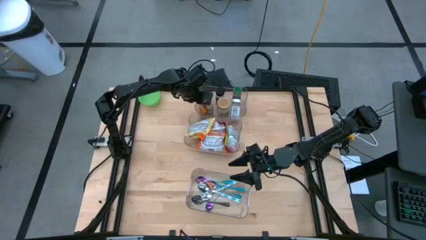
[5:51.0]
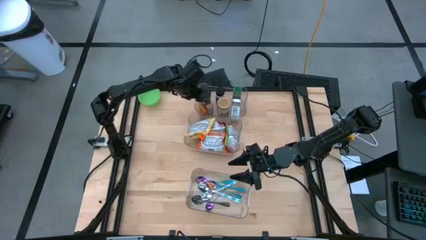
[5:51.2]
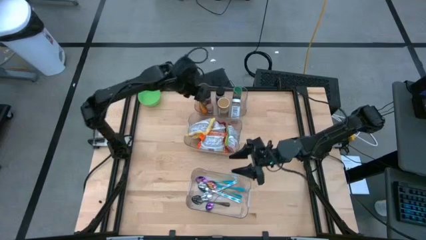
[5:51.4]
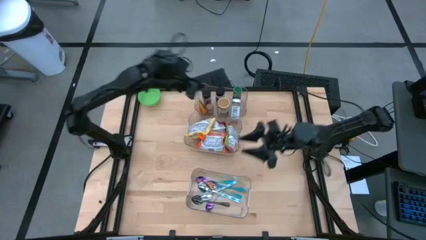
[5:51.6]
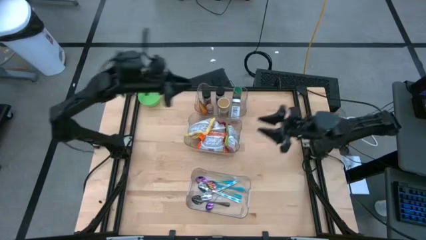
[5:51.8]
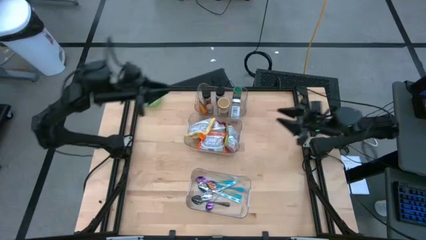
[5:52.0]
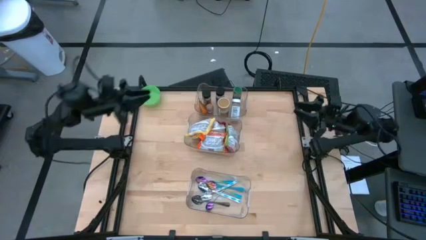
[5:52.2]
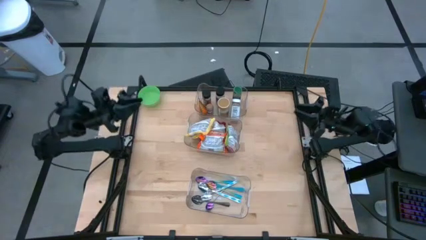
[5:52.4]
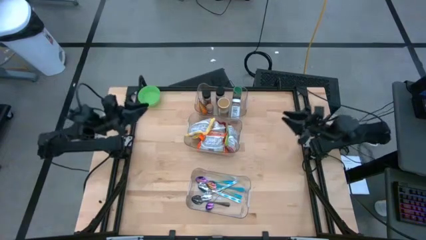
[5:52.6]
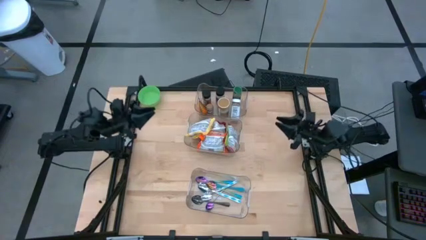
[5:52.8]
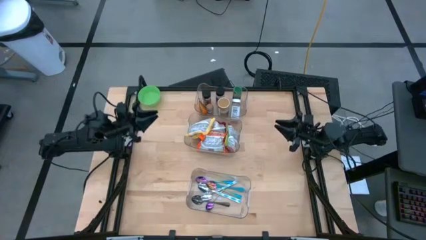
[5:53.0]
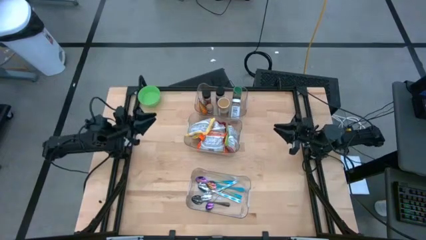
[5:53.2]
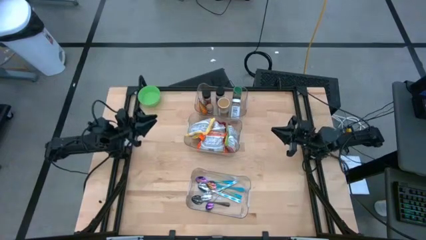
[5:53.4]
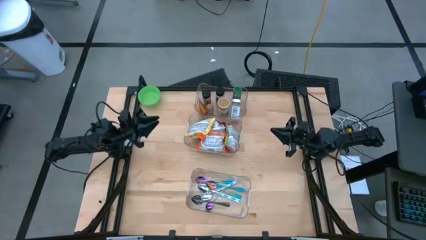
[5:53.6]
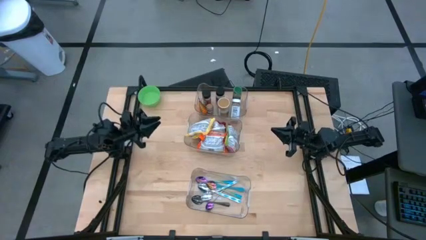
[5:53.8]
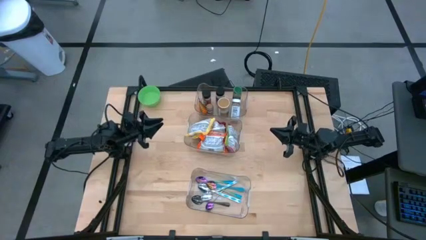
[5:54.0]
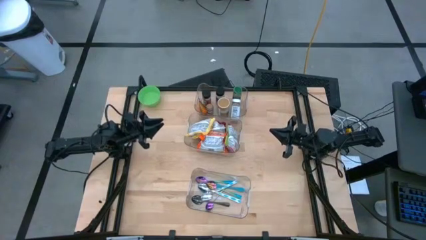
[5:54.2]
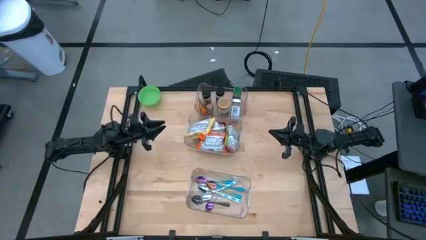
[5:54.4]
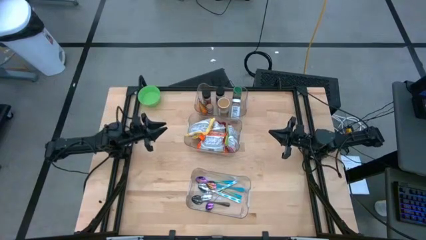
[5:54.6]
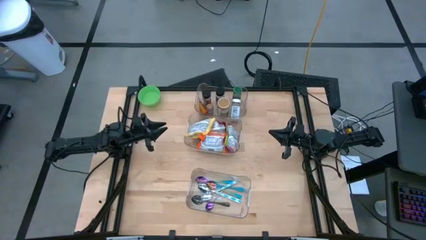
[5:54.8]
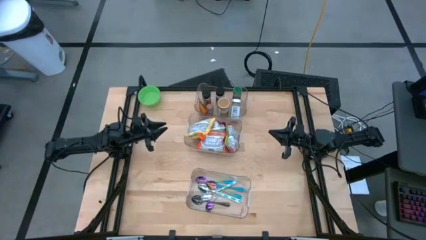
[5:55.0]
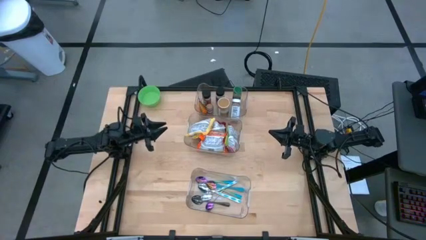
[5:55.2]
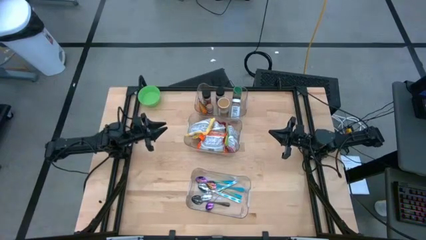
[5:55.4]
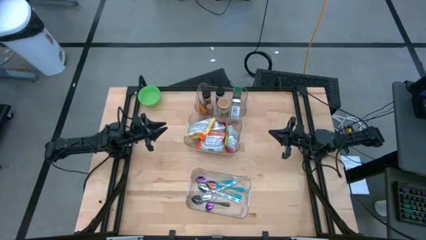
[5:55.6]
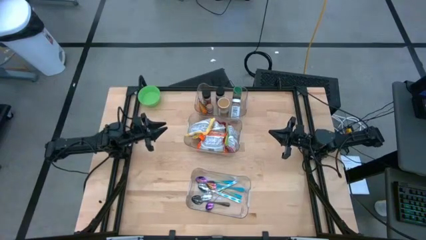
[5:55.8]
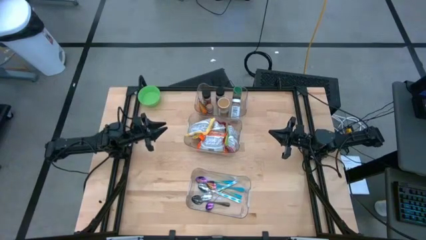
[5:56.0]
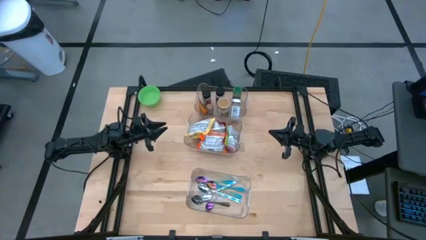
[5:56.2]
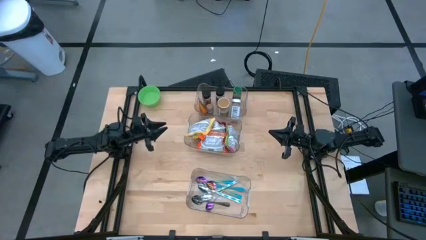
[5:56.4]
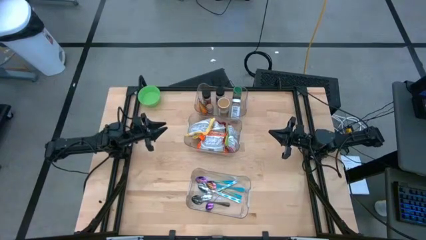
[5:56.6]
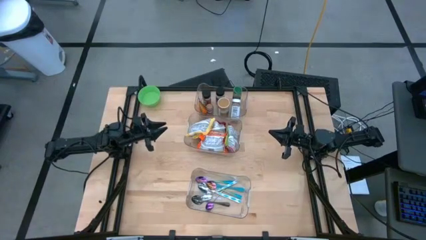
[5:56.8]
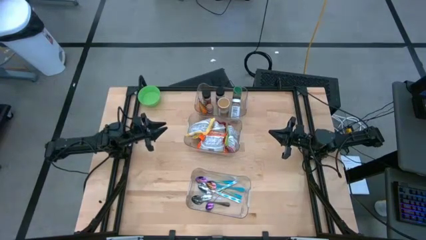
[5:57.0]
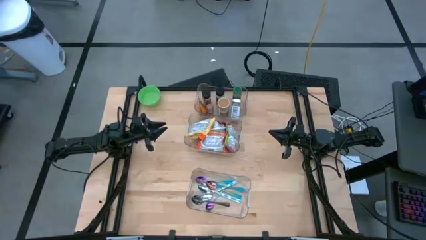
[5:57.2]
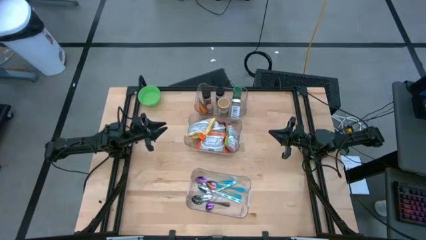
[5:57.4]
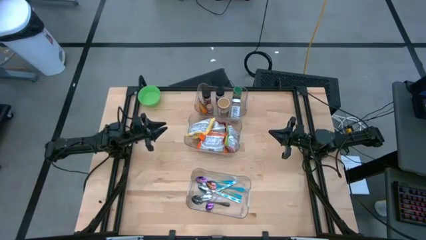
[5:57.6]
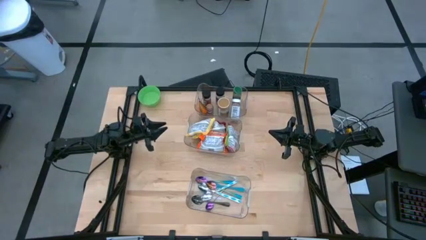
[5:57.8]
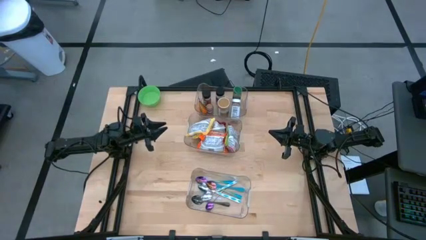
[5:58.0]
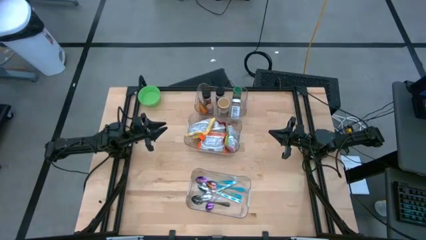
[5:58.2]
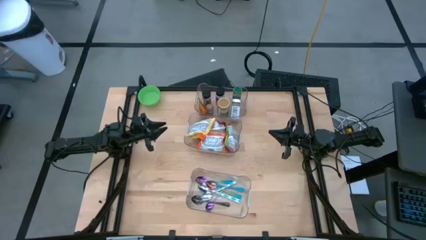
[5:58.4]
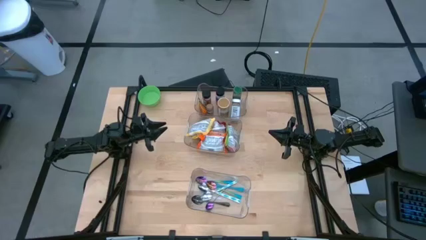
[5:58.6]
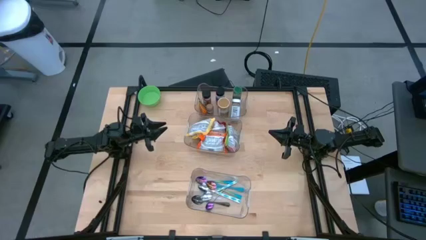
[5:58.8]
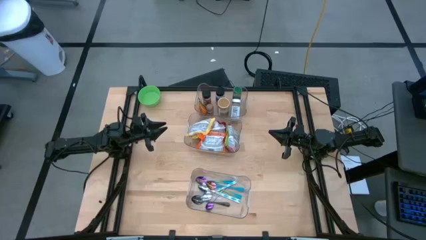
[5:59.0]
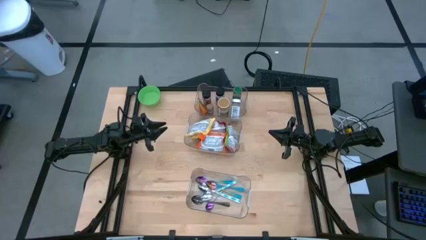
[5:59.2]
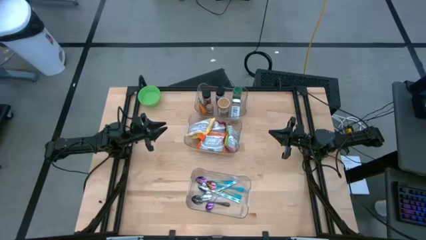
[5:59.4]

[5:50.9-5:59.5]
Task: Pick & Place Food Item
Return to Home Position

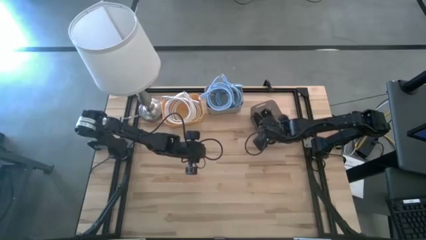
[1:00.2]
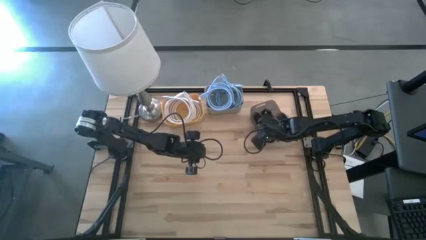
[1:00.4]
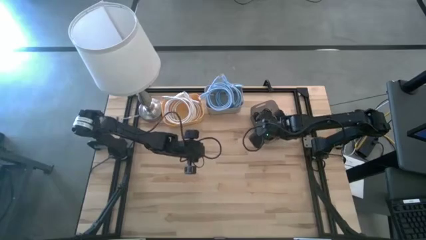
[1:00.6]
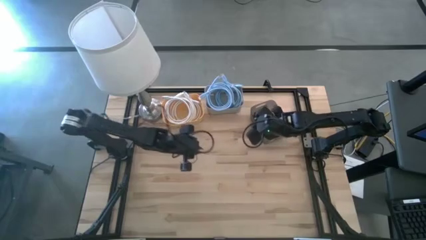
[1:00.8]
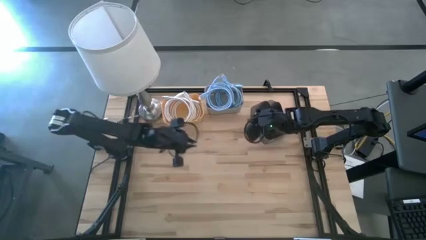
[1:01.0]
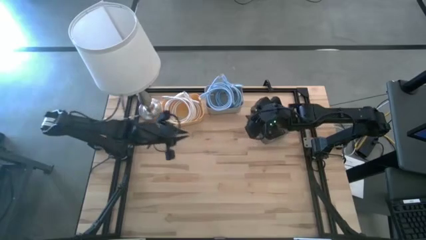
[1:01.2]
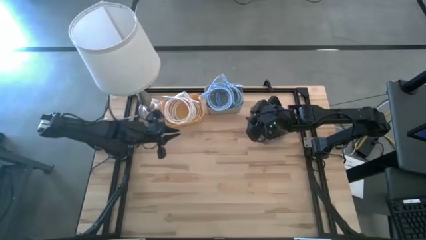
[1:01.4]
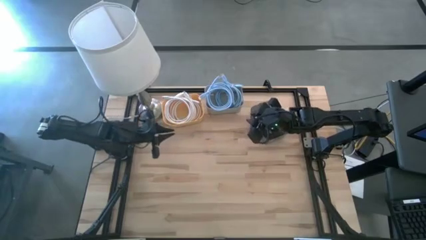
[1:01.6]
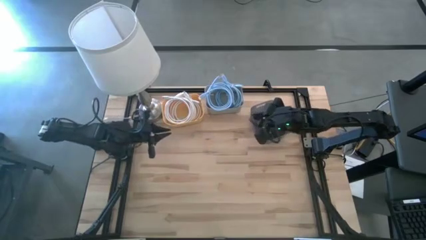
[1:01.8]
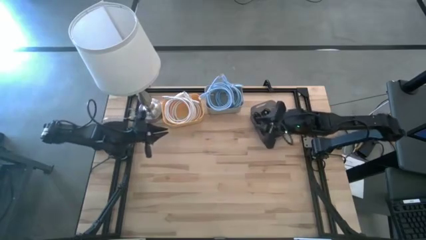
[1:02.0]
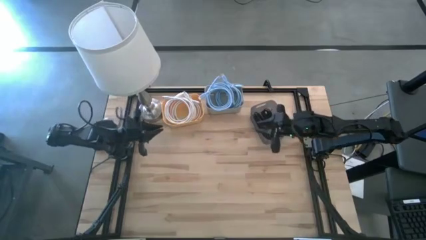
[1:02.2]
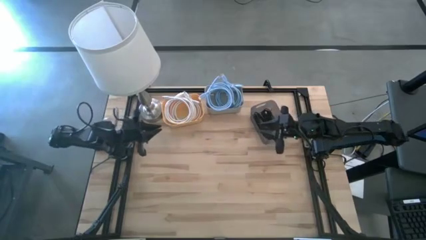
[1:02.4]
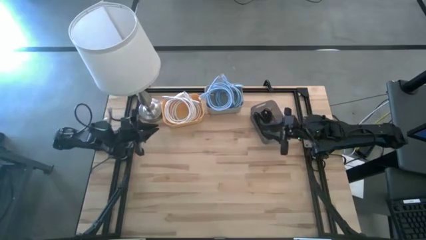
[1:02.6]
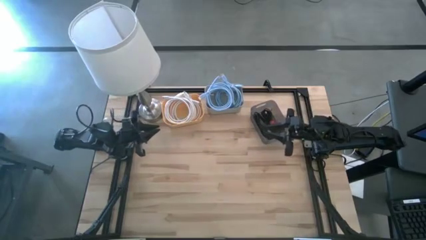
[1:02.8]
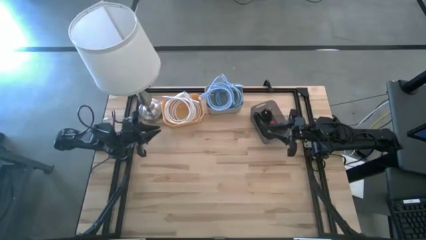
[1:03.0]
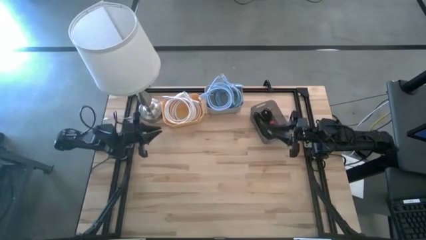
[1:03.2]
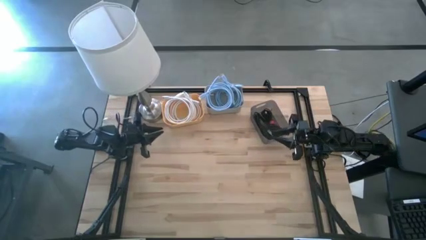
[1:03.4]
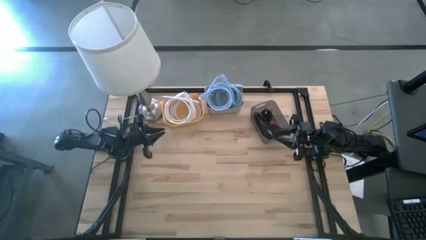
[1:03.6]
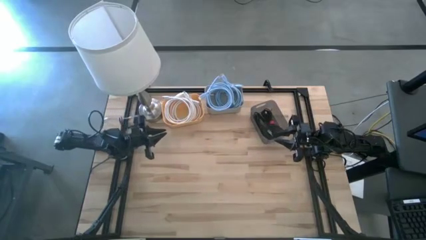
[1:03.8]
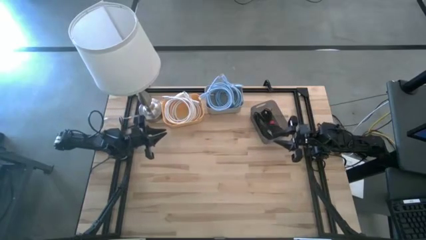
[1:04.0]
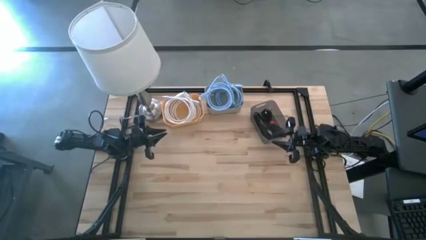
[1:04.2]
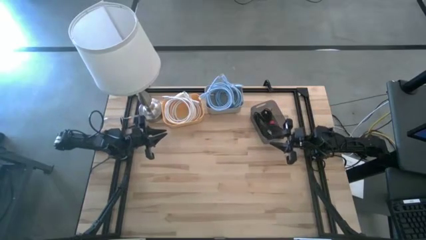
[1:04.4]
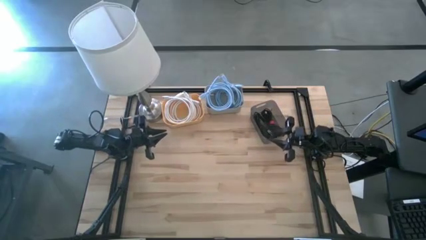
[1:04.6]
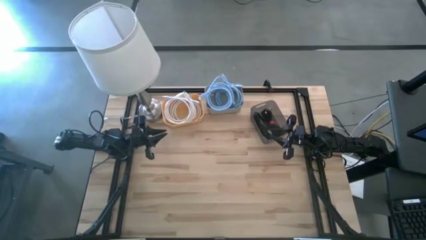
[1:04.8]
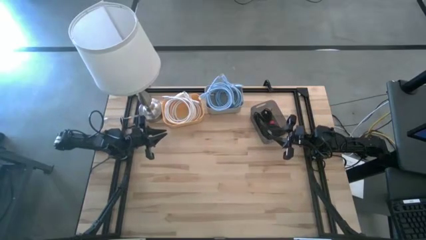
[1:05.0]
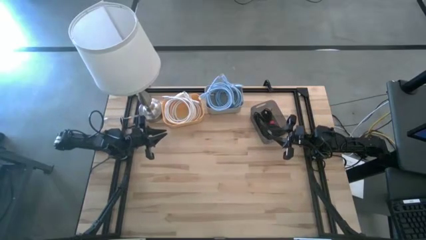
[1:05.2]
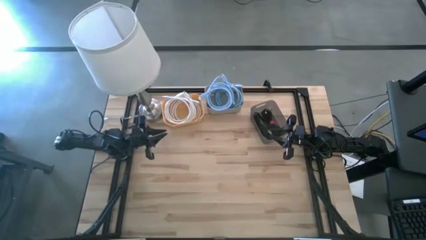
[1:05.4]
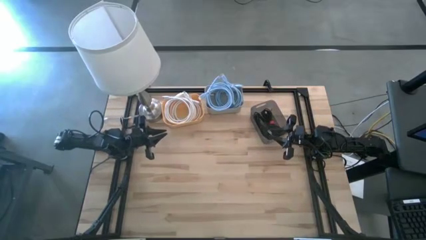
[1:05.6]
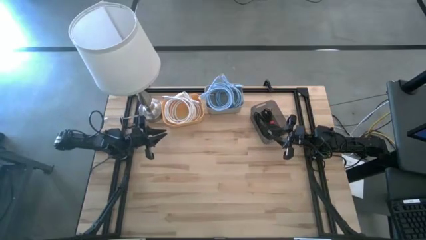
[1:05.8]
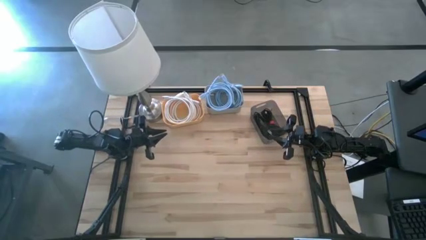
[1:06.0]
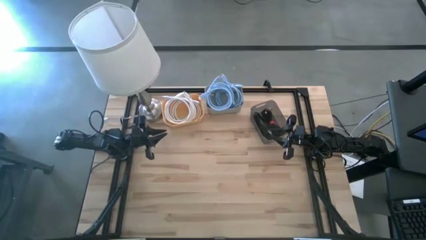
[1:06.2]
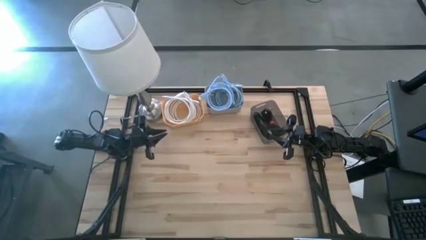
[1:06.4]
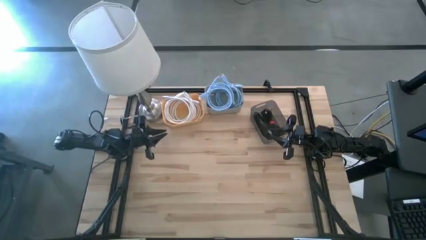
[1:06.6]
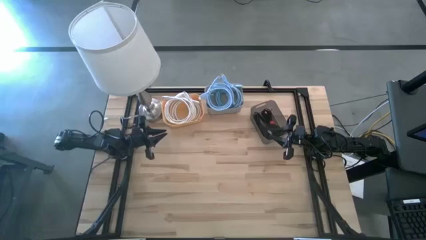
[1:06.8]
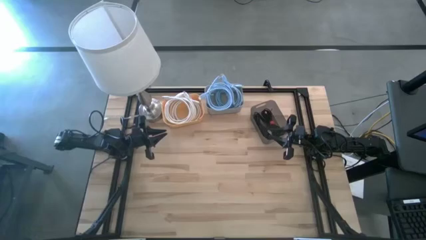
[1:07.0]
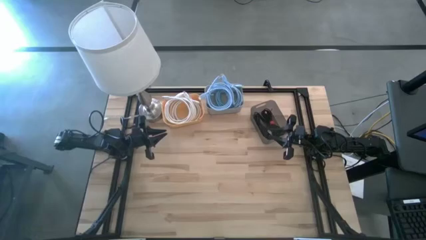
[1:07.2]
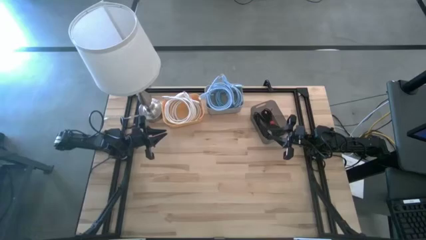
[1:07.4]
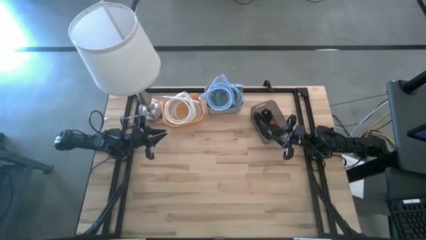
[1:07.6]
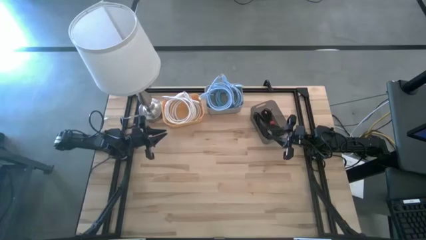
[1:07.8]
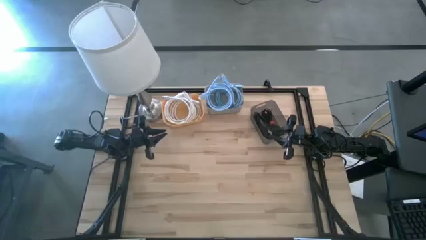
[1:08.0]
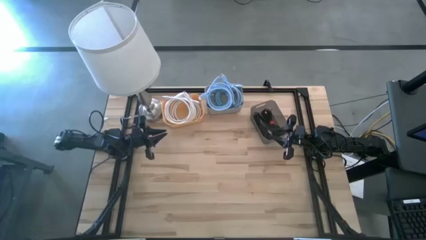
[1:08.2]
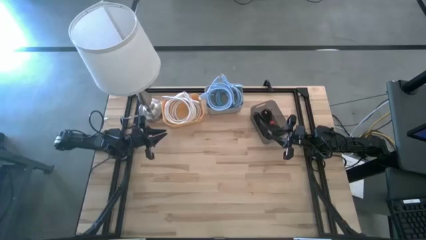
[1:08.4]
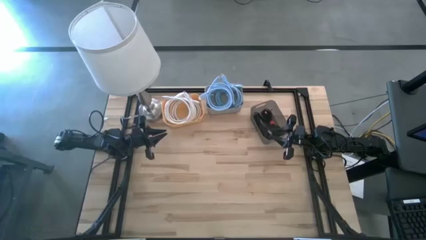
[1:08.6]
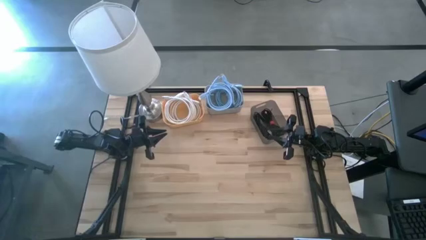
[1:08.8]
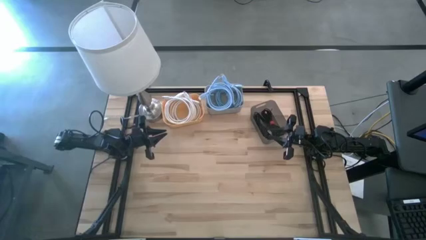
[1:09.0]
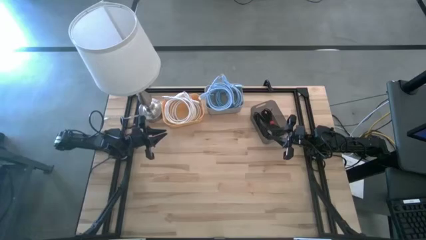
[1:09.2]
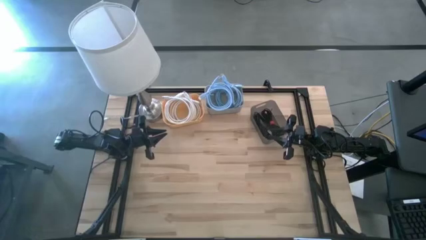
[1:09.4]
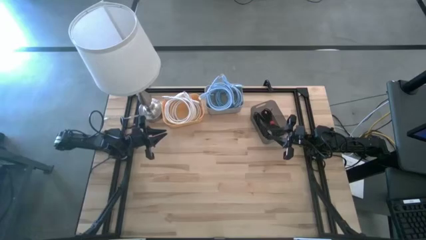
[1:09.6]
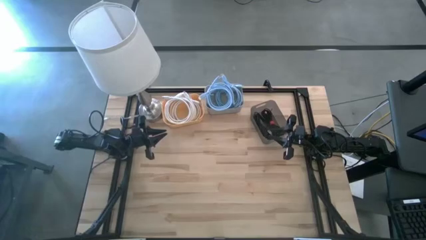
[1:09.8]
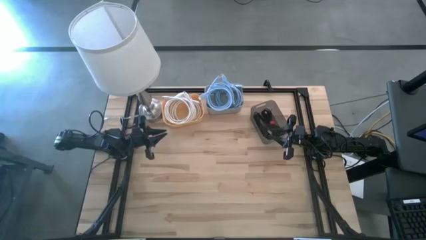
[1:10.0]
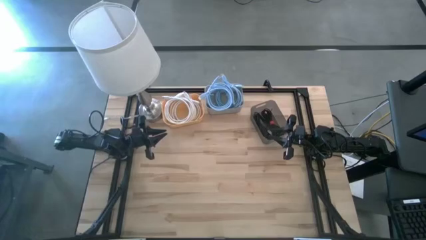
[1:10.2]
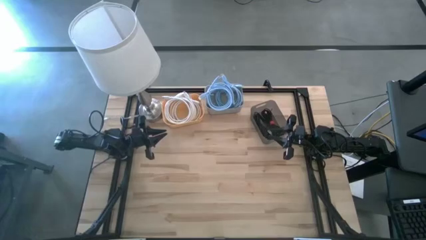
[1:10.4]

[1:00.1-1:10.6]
Task: Pick & Place USB Port
Return to Home Position
